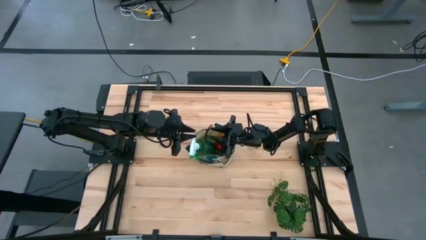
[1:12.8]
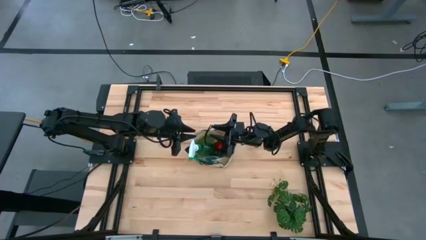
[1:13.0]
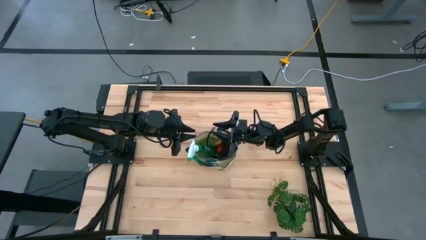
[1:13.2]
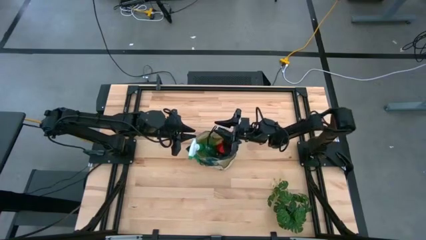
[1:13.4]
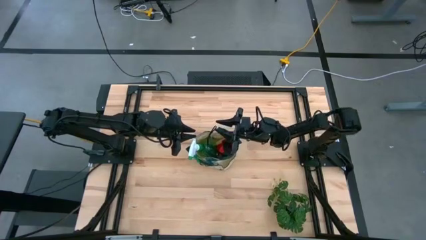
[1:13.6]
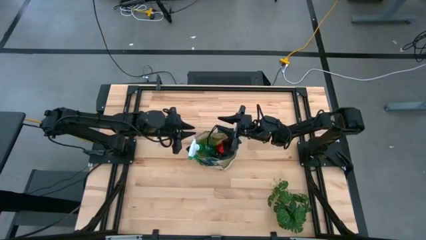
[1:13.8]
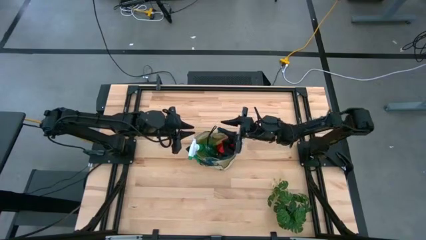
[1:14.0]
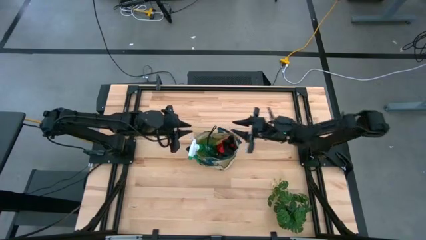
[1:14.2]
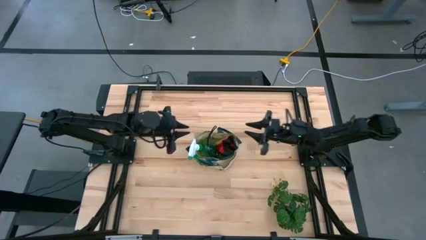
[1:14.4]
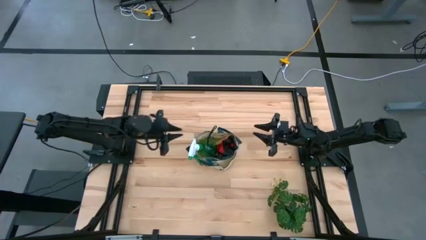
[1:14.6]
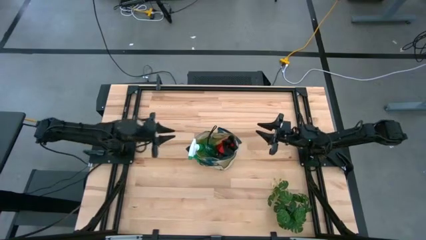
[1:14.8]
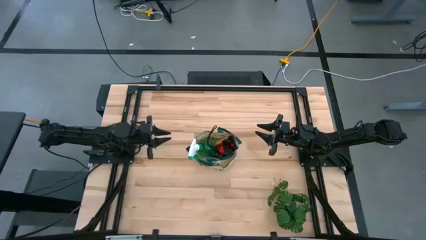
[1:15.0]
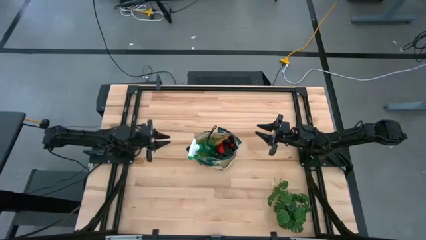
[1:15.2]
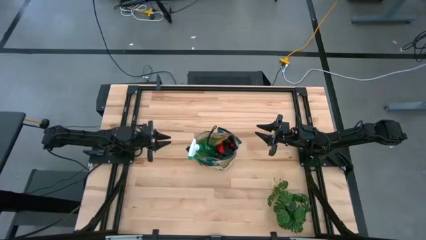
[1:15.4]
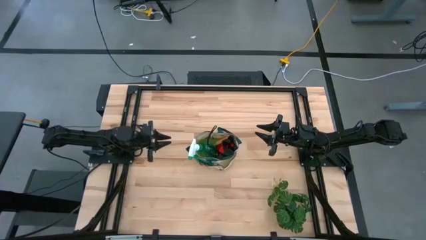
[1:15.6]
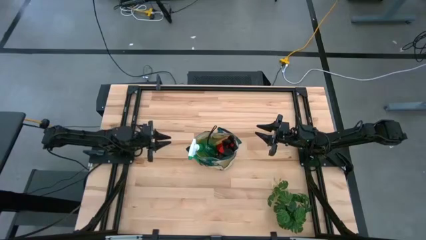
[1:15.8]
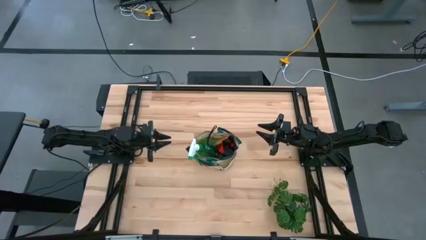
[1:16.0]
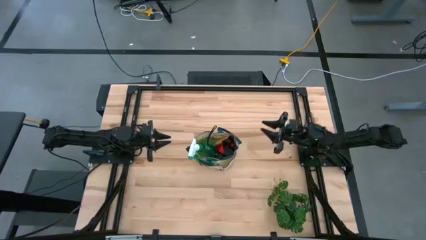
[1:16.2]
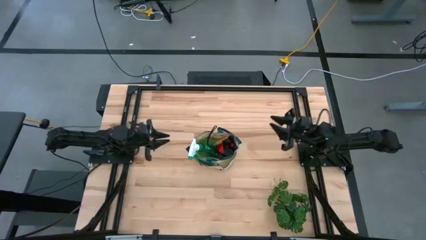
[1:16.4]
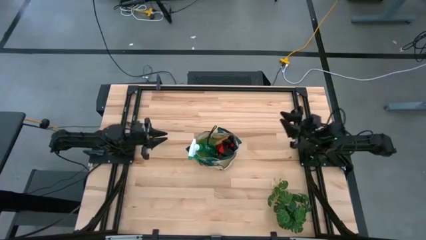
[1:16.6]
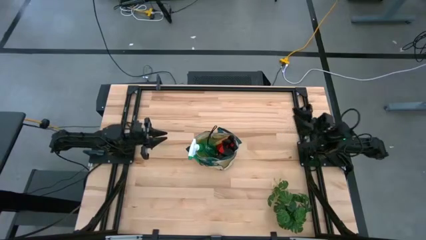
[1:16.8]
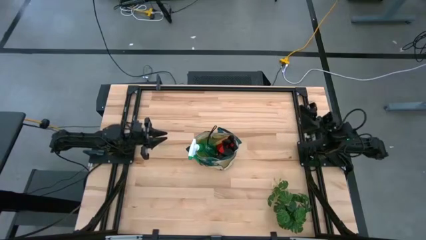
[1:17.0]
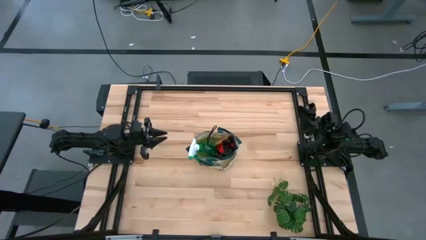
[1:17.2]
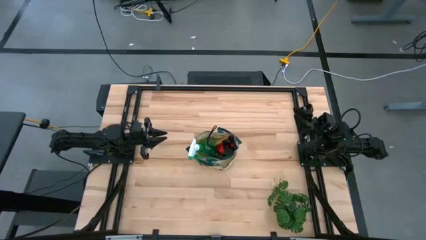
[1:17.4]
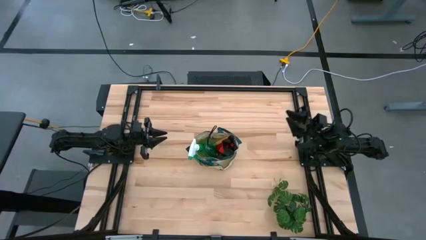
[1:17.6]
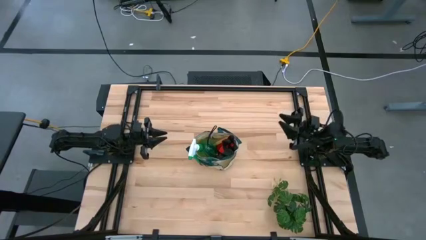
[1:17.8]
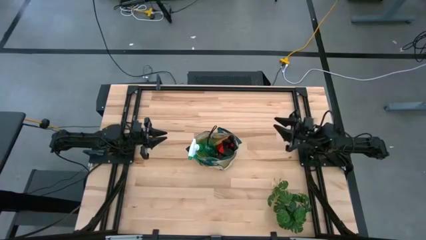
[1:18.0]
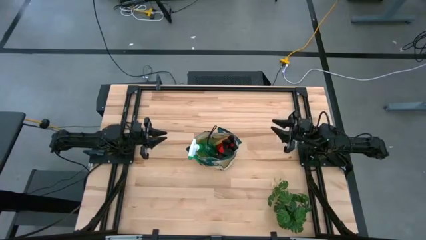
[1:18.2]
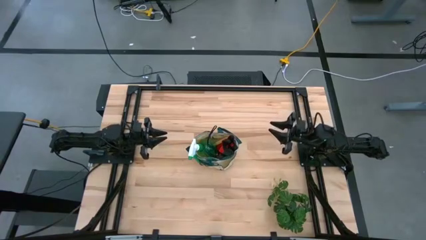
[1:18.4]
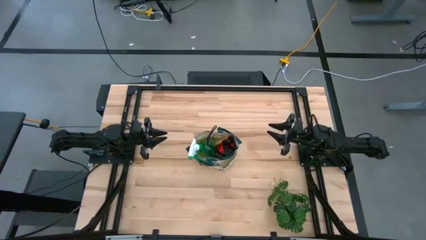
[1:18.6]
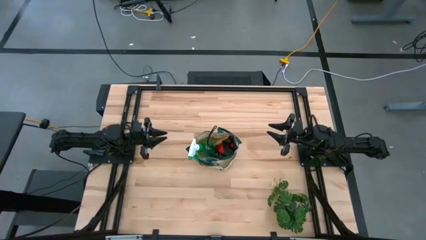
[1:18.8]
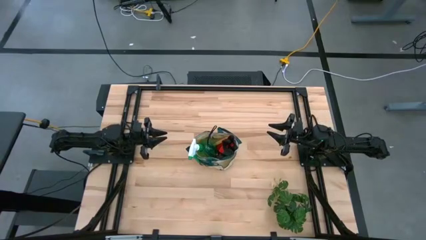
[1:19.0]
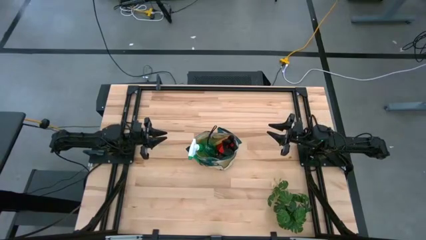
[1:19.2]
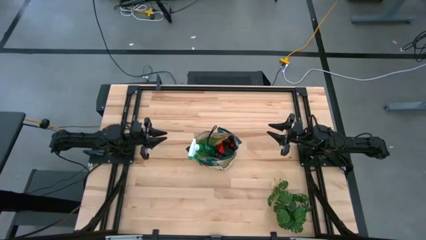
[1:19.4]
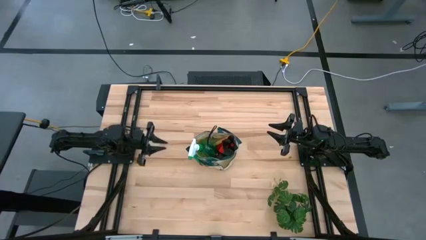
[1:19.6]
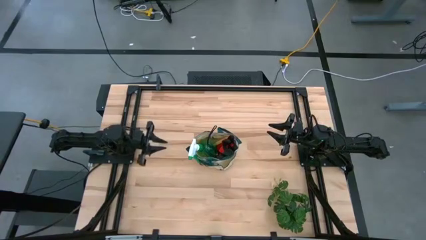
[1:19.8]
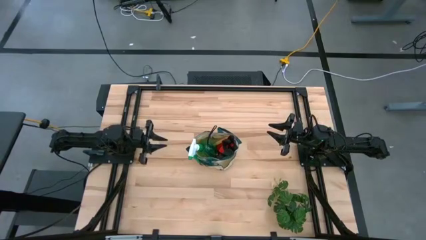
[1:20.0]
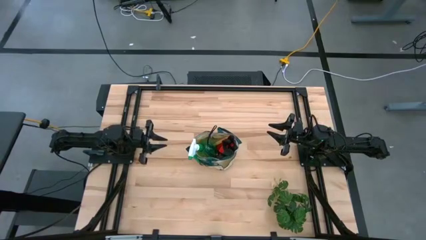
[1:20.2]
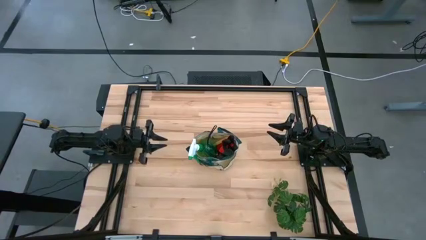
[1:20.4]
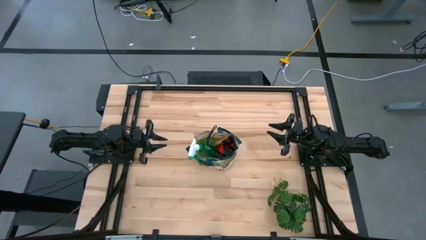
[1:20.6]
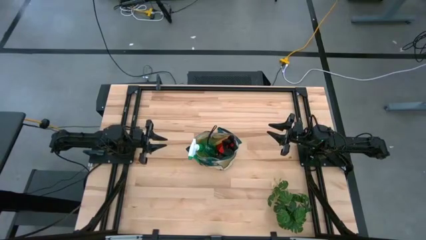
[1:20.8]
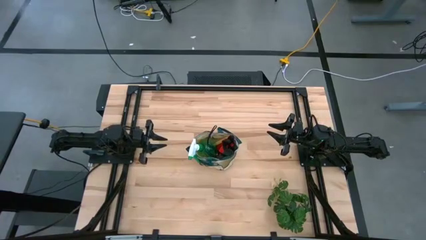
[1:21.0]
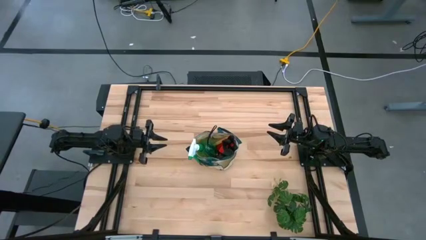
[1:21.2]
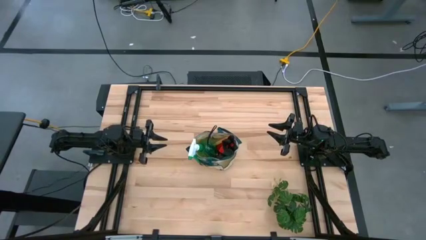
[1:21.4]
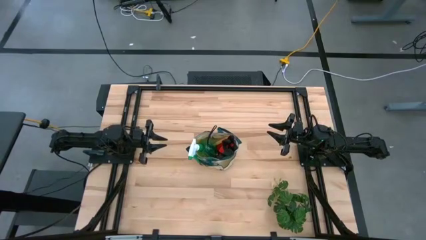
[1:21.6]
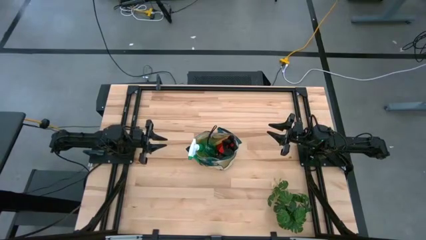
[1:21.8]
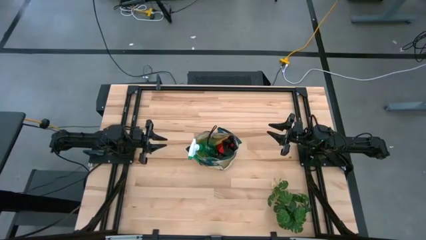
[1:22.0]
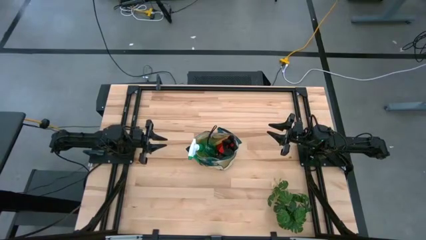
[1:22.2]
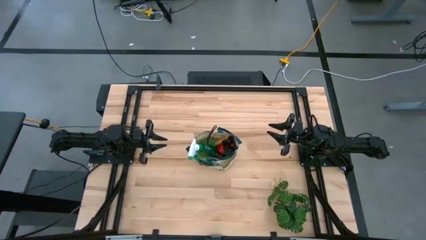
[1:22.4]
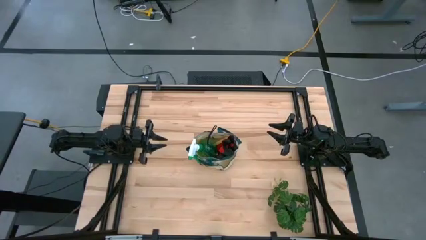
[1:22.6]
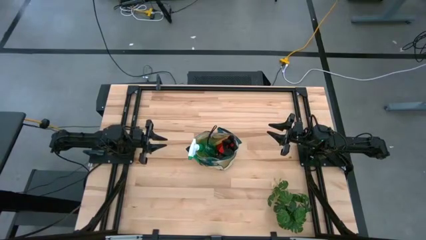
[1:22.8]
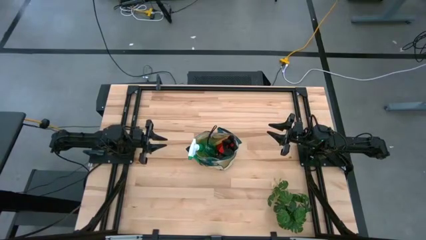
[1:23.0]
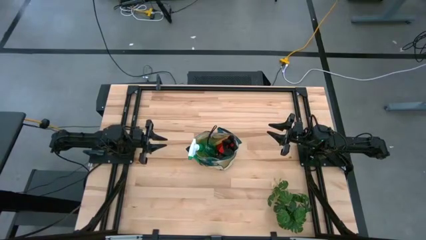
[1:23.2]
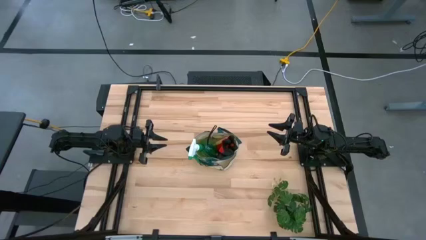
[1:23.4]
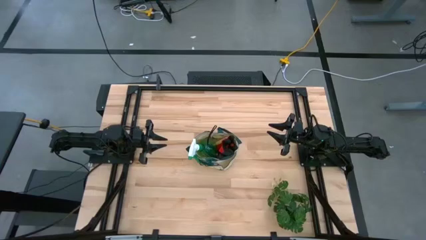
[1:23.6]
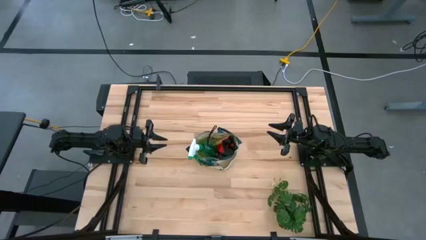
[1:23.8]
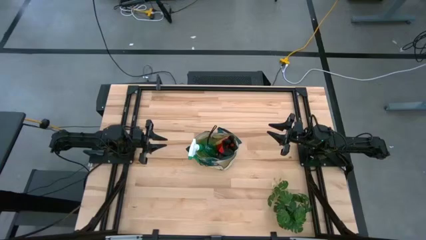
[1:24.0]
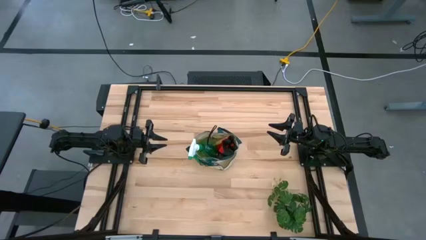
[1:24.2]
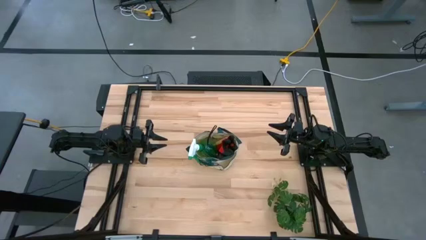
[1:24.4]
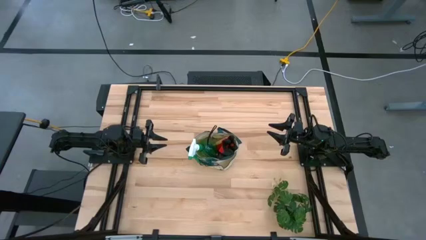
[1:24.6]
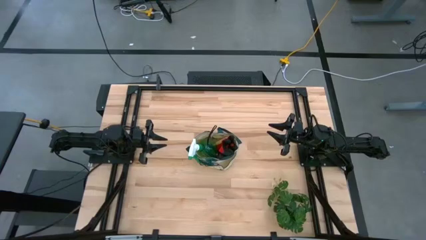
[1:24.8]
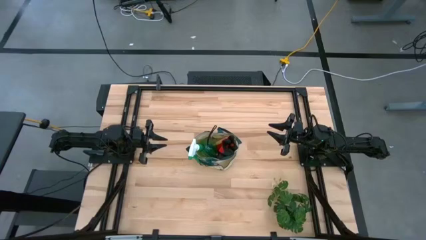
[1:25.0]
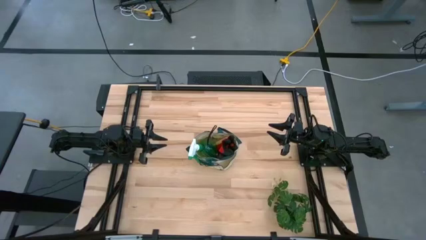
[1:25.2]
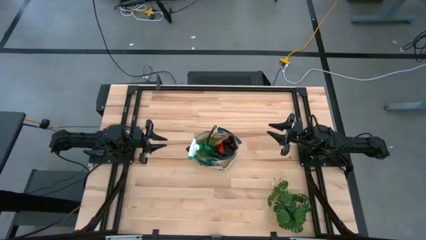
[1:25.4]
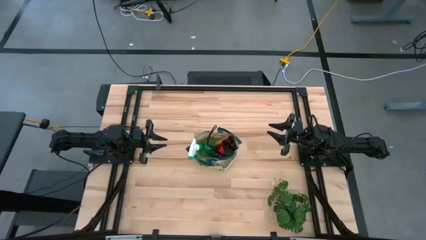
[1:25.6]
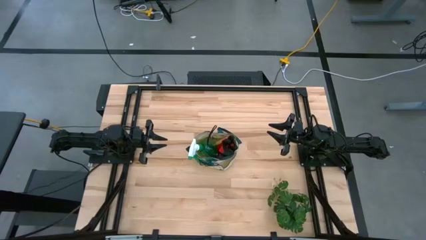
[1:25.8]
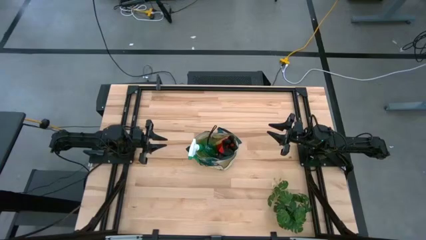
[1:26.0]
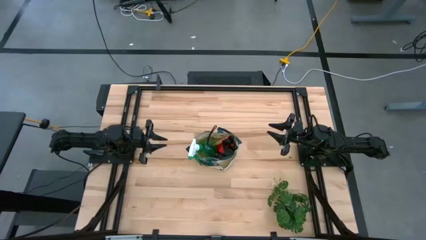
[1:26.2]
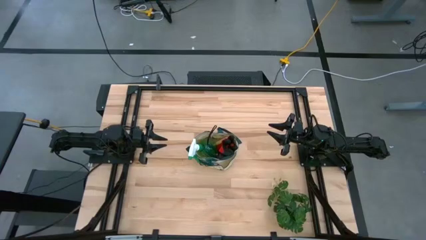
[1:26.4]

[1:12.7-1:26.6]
Task: Pick & Place Garden tools in Gardening bag
Return to Home Position

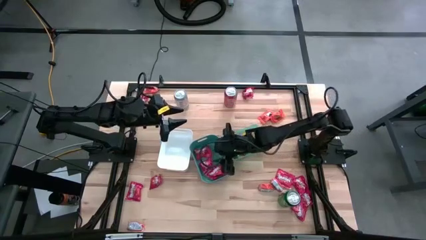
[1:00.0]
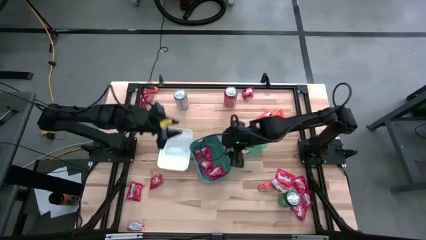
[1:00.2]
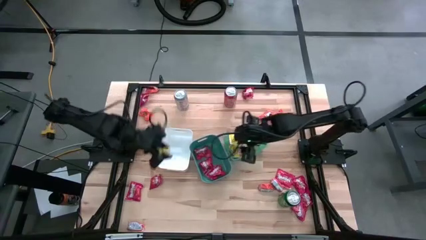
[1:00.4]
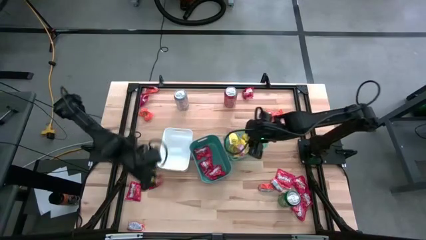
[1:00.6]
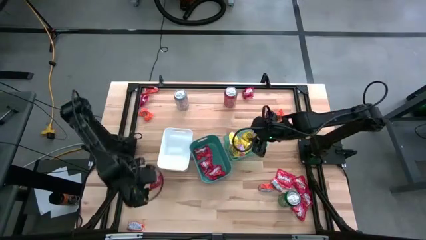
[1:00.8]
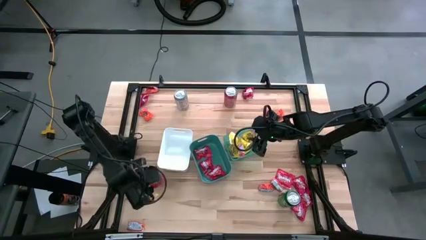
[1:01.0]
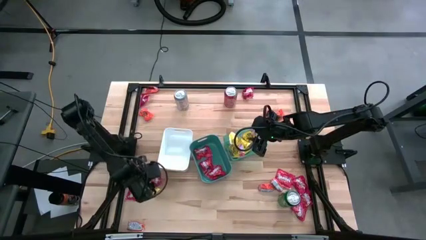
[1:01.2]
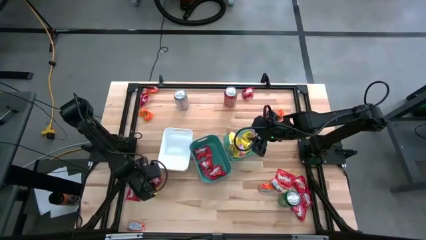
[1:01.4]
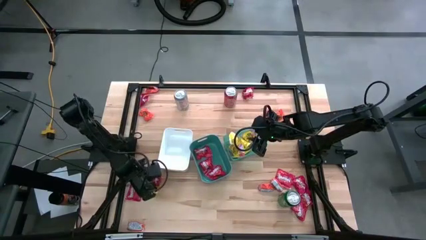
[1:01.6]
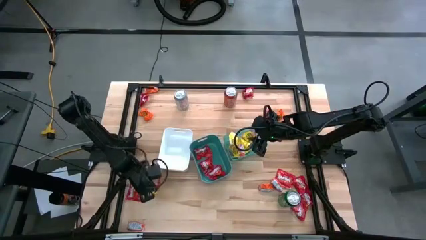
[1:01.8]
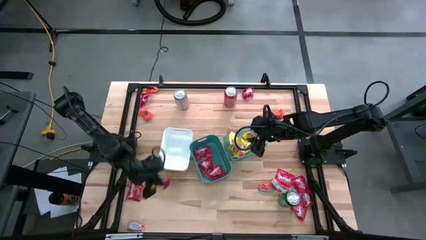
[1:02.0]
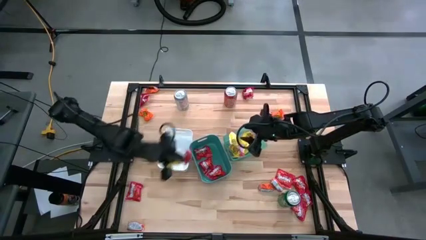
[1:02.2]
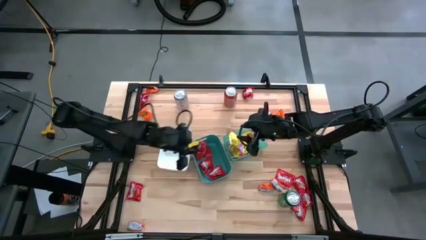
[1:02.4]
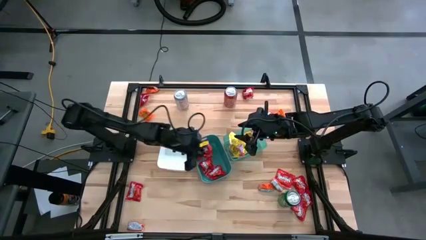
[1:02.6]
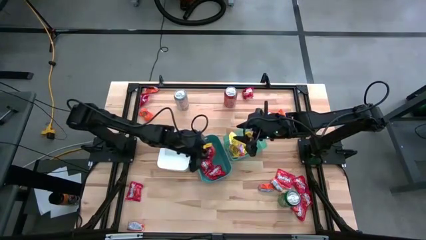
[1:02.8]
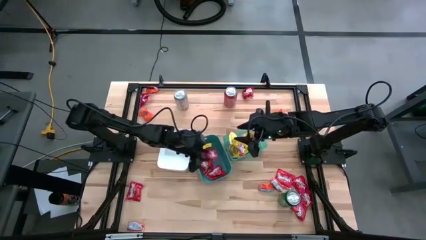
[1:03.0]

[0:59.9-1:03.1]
Task: Sort candy
Put the red candy into the green bin
